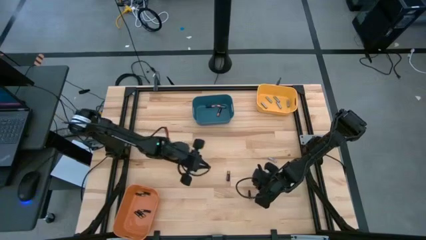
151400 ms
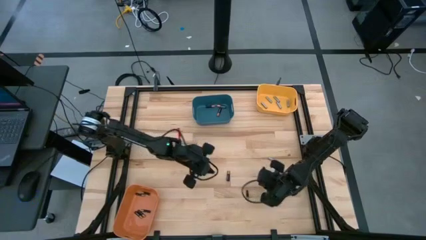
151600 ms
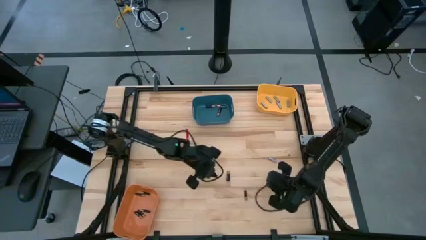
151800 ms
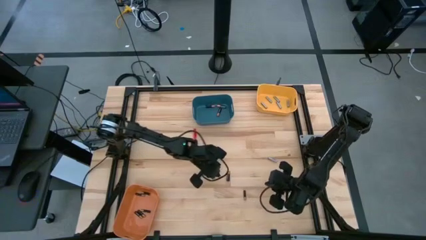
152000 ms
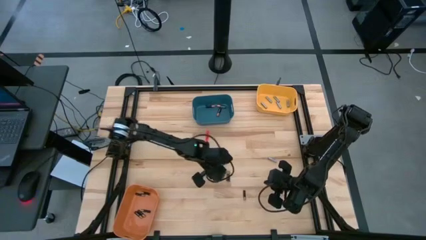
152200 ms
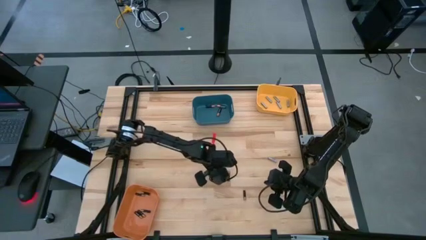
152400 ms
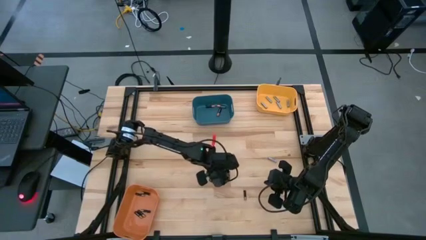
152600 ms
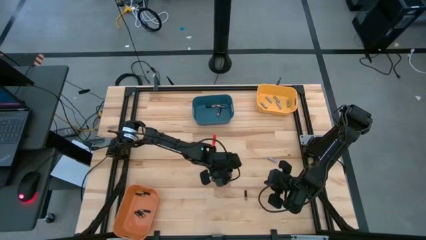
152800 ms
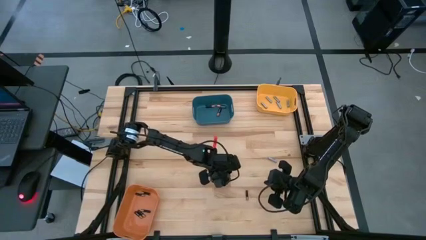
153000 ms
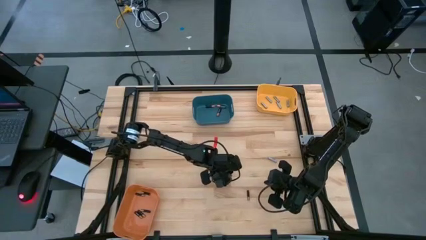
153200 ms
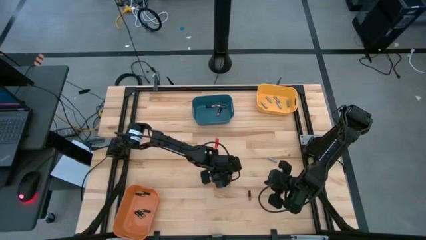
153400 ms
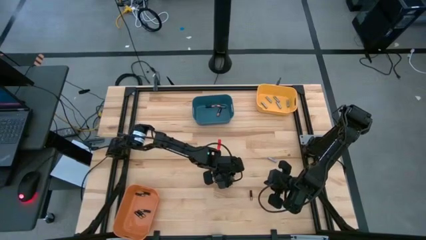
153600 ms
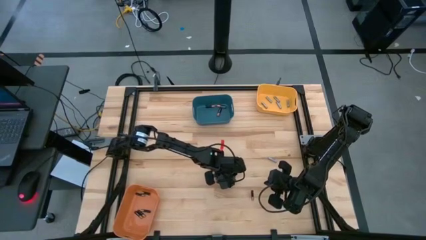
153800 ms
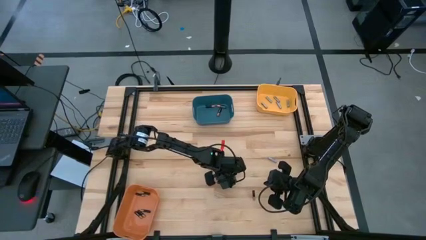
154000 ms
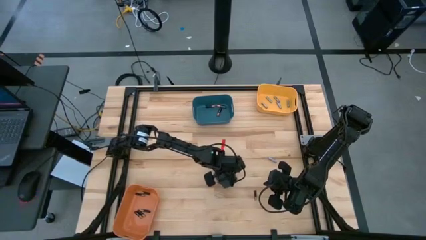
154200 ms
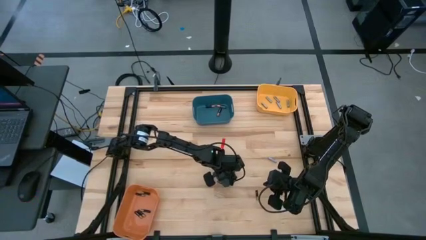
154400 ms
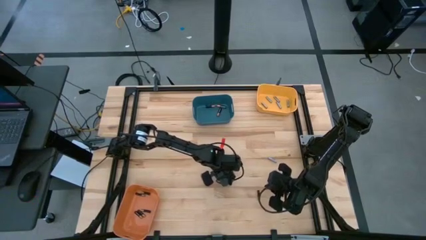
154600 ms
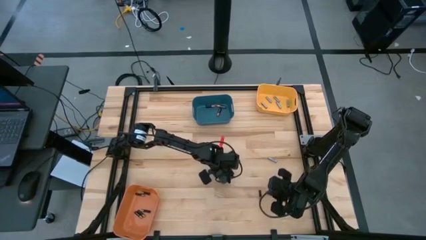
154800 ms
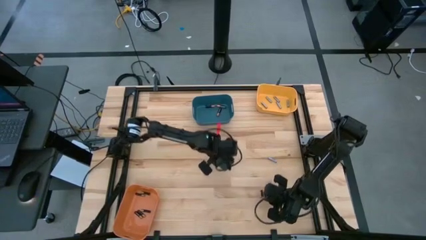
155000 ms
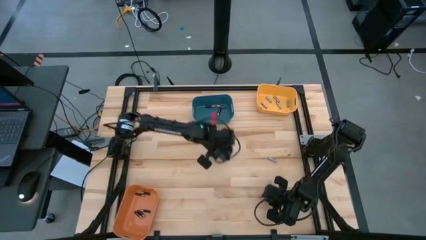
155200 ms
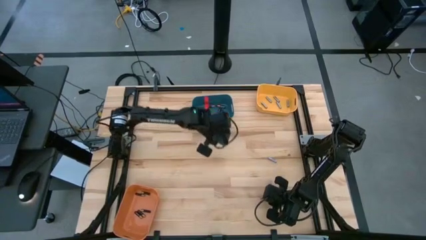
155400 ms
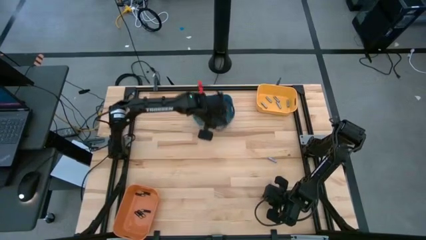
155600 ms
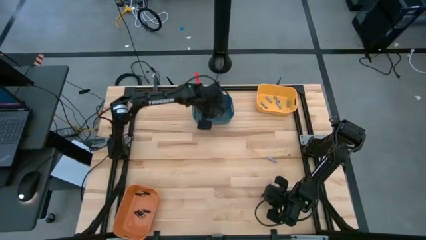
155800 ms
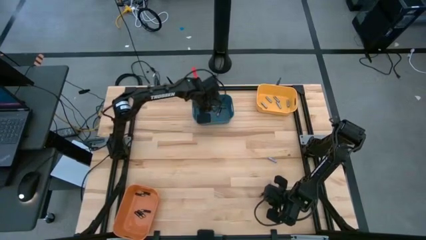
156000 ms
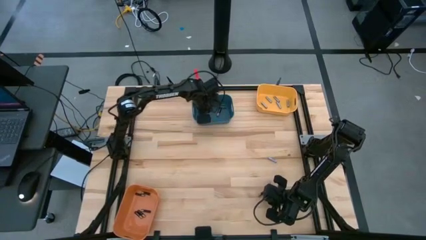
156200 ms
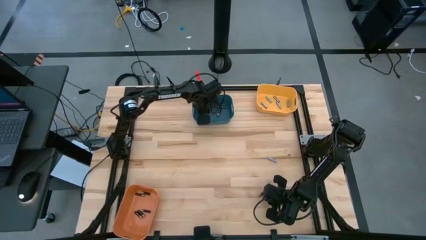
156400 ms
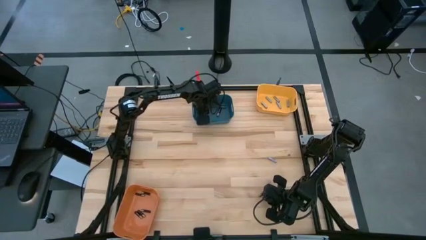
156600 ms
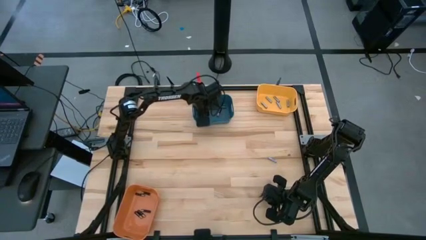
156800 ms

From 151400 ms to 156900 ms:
Task: Sort batteries
Put the large black battery into the blue bin

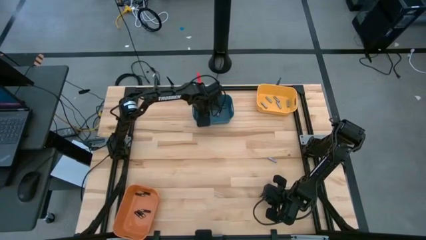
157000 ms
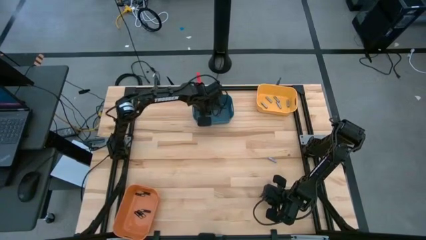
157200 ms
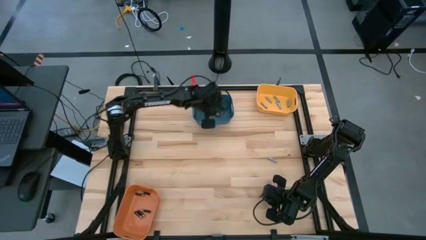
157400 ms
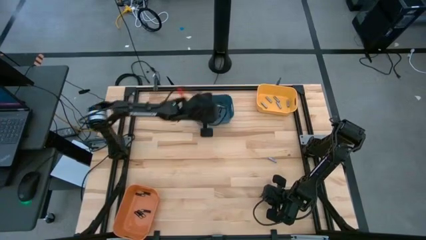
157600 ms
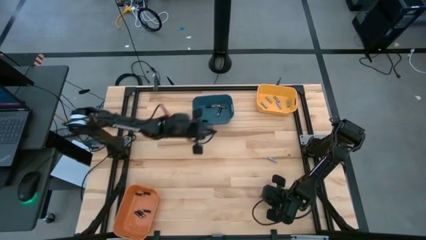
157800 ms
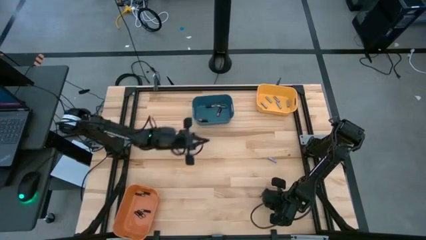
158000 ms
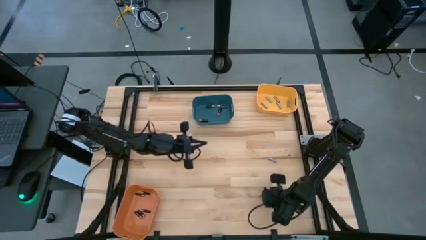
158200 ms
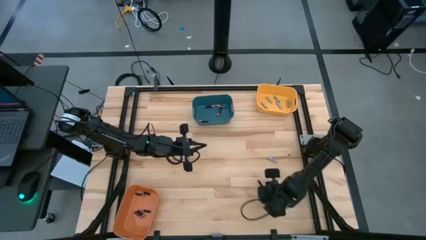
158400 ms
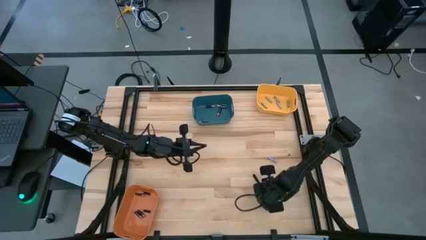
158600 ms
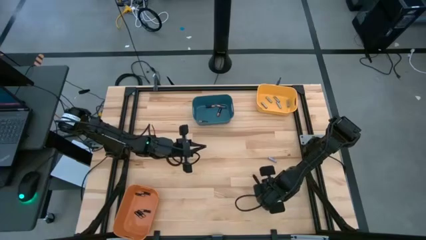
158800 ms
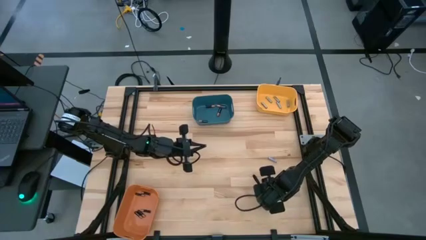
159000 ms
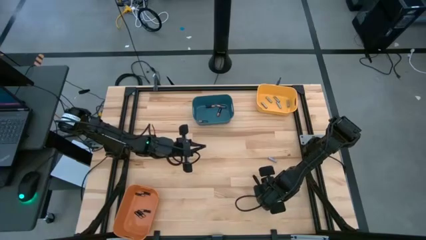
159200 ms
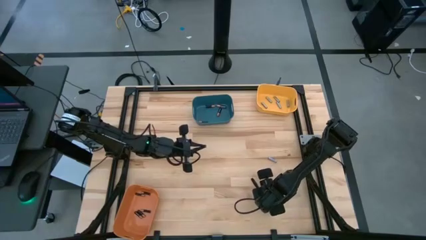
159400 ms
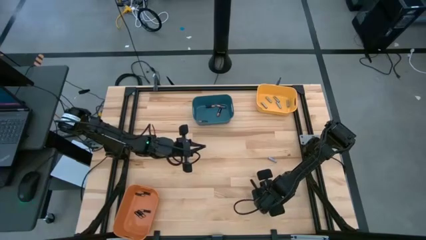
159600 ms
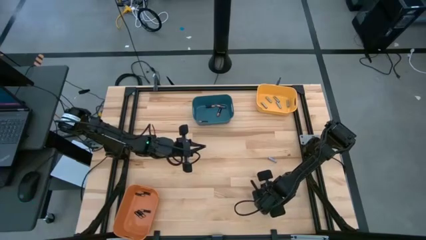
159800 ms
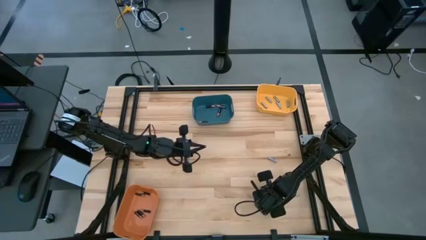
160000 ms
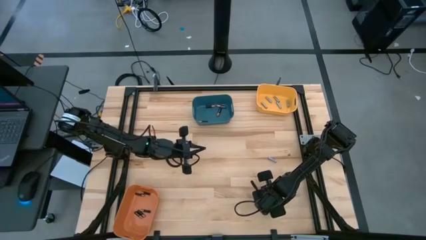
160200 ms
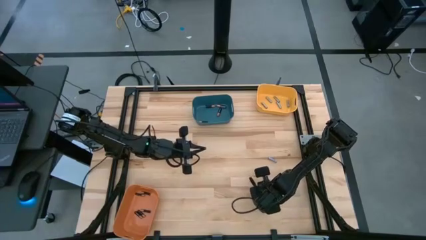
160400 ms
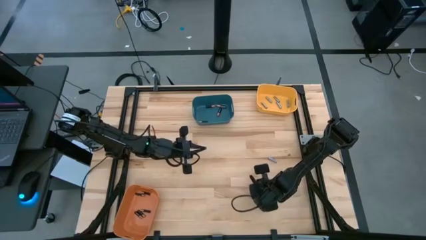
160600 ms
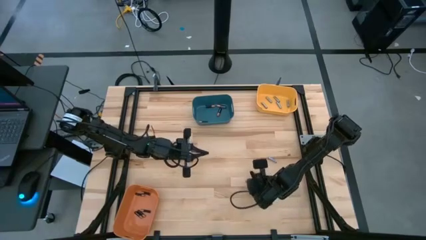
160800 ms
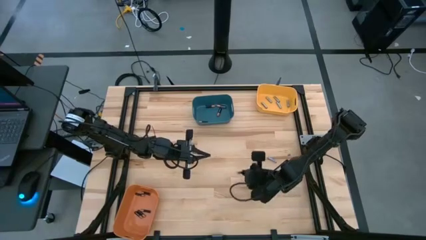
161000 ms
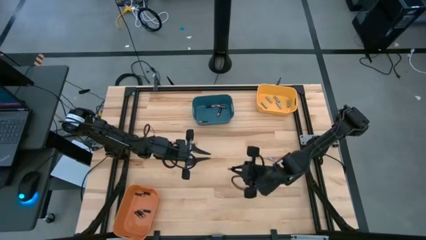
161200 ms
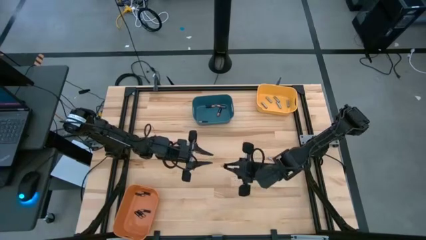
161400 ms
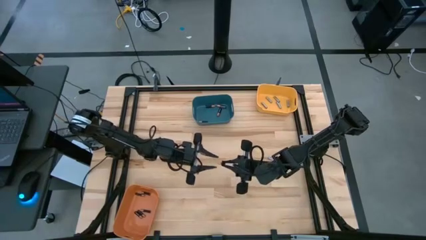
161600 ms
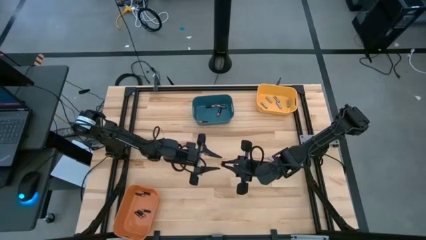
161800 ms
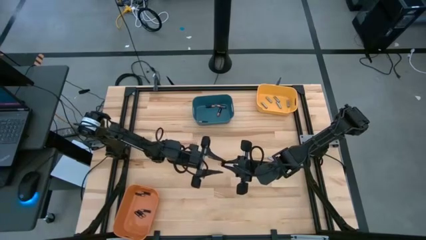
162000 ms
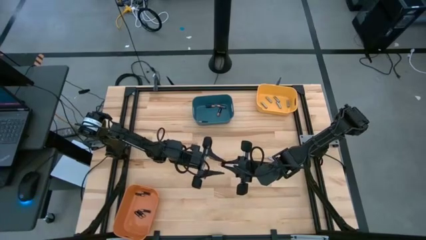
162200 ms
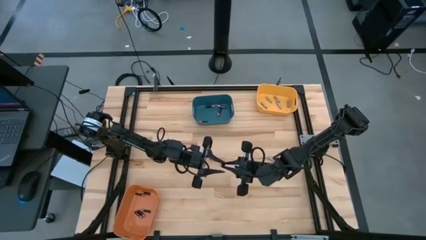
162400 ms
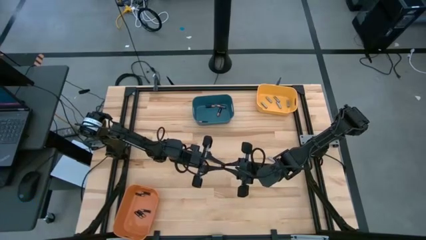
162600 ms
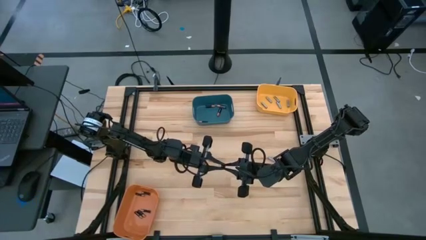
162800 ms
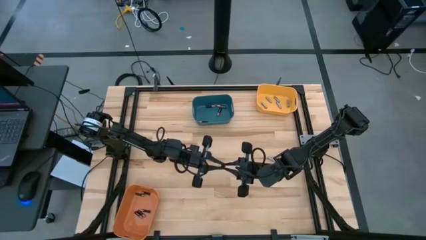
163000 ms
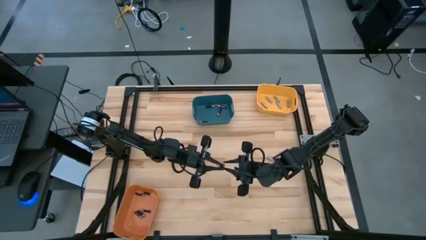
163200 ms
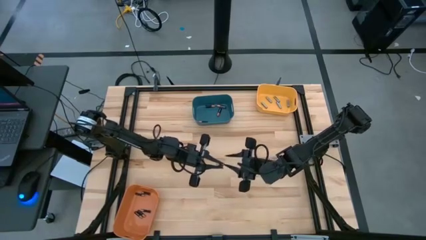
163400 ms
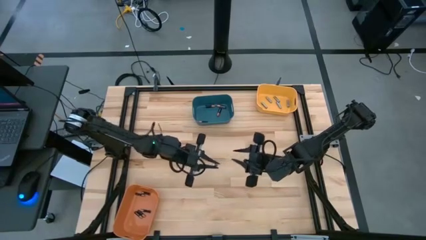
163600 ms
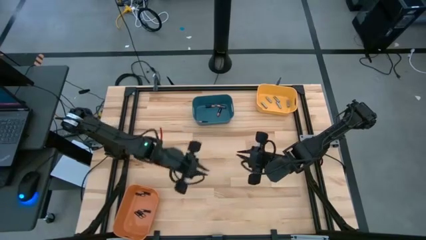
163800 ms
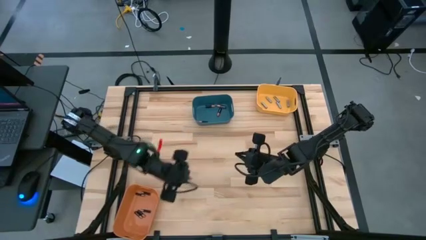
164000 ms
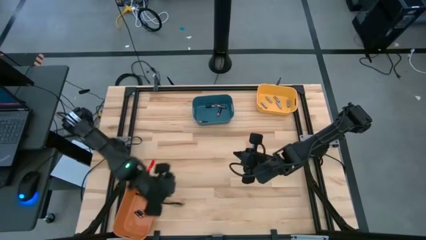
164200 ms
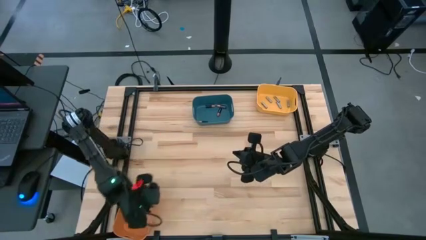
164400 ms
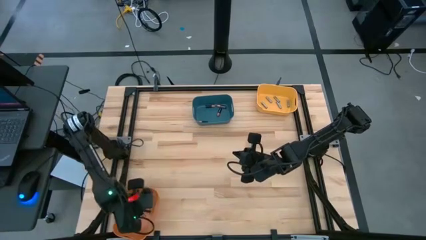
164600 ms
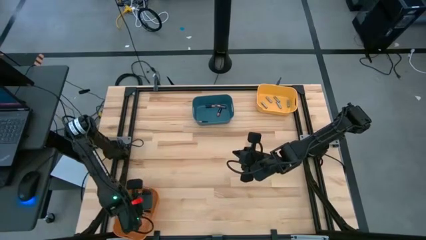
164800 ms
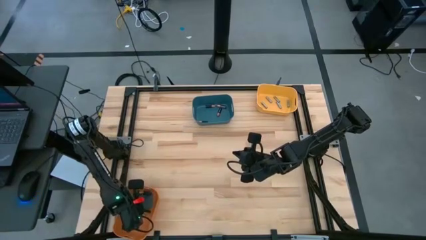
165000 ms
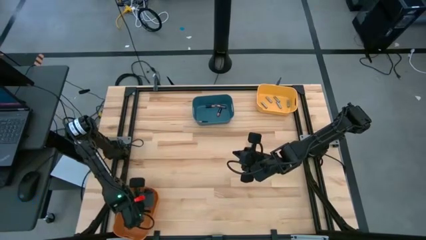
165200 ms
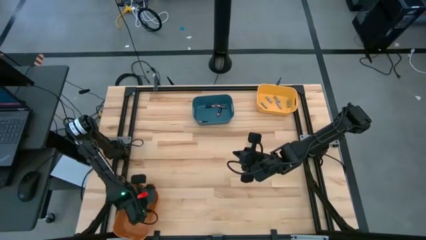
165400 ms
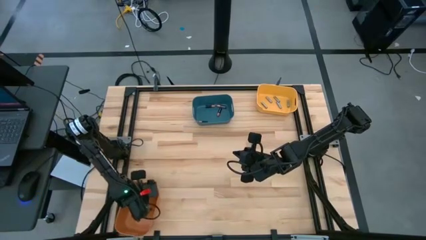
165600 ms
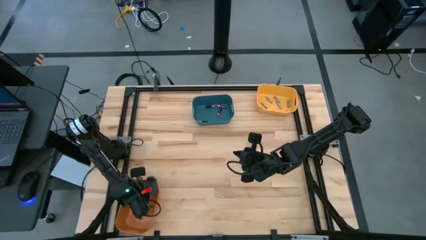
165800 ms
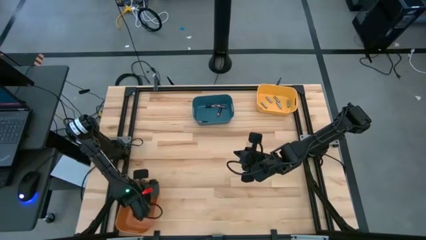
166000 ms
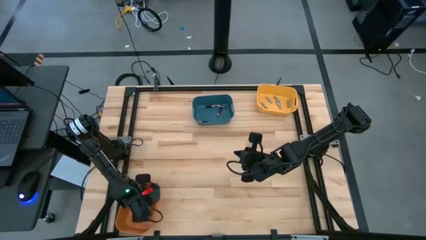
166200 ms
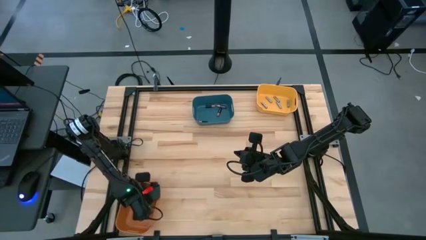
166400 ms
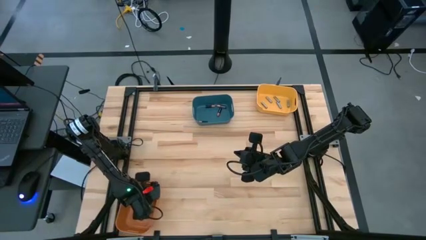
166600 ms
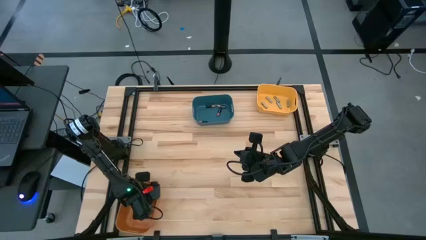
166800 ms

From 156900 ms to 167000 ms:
Put the small black battery into the orange bin

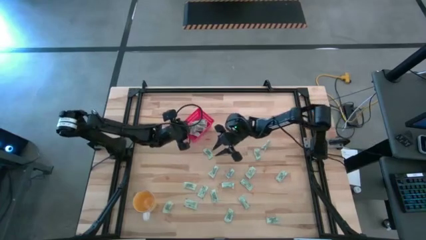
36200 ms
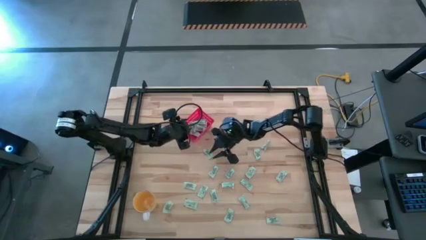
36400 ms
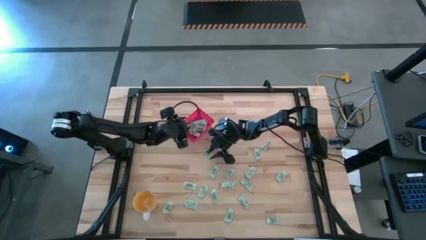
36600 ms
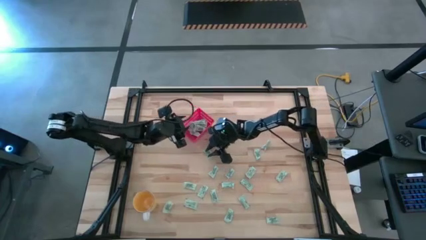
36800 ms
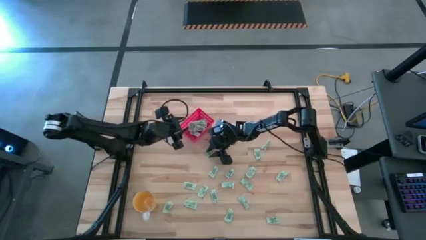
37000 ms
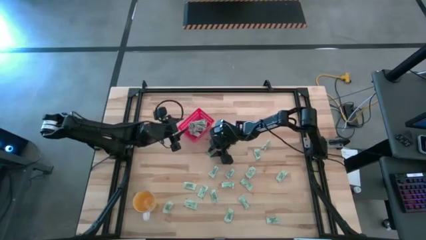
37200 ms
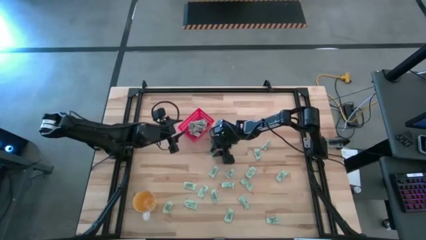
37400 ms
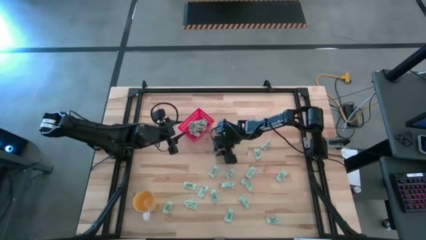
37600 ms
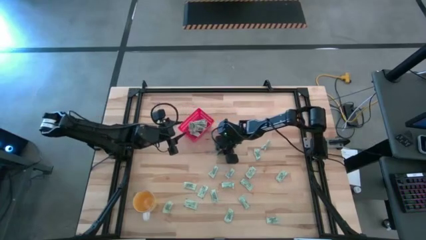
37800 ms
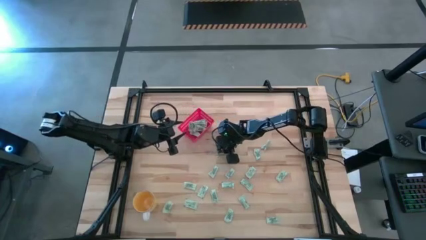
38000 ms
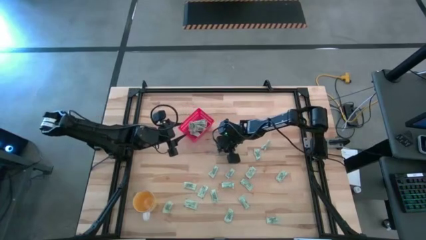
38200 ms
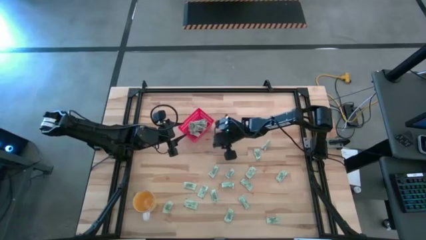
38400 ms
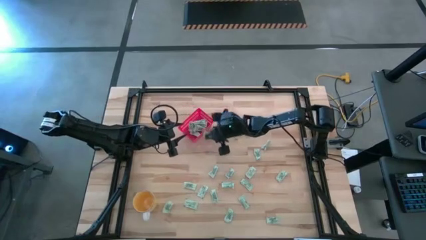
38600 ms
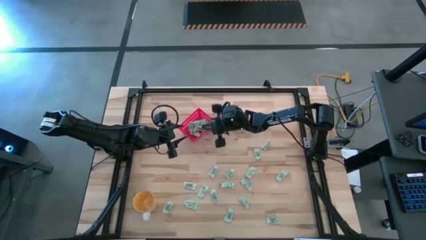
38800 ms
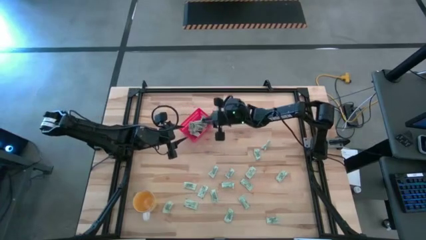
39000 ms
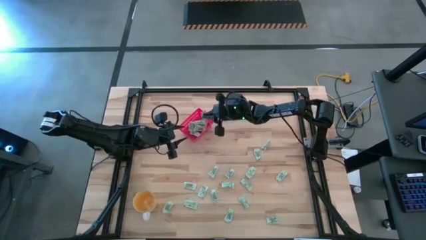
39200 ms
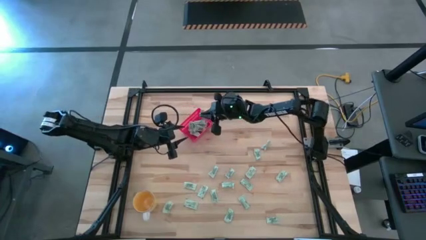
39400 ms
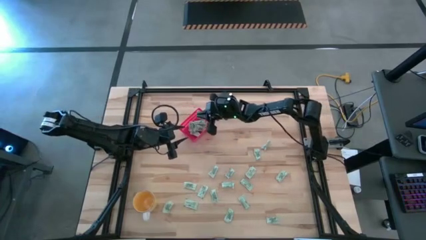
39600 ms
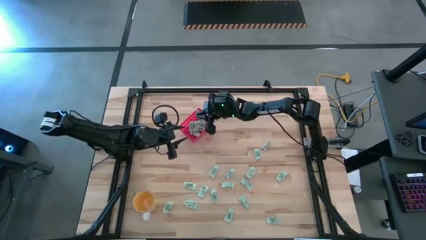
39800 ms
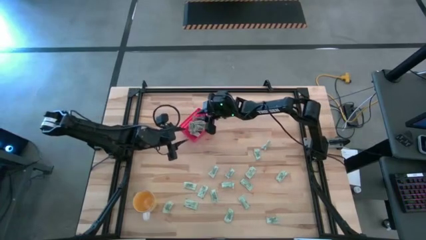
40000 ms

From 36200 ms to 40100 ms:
Task: Pick and place Stevia / Truvia into bins
Put the white stevia packet into the red bin
